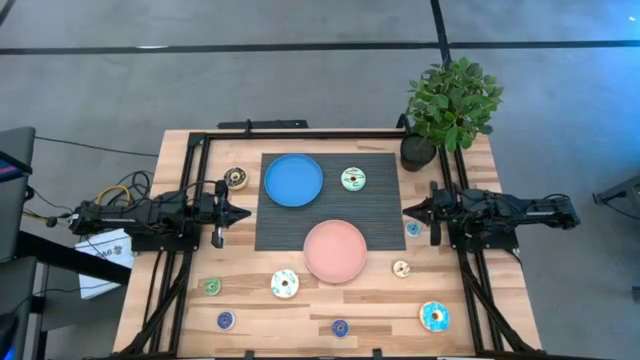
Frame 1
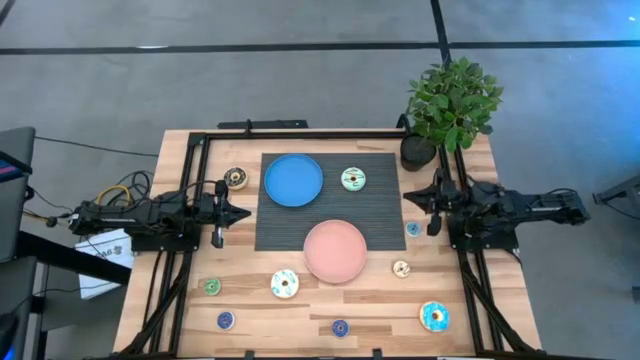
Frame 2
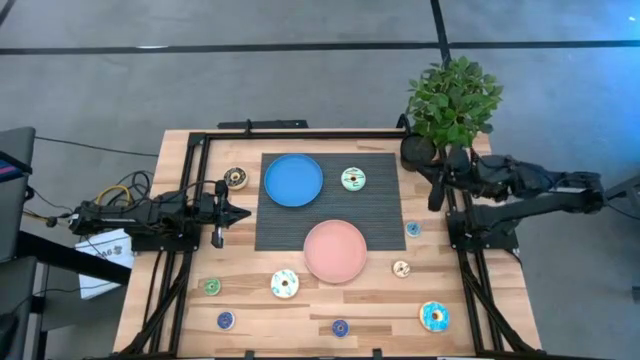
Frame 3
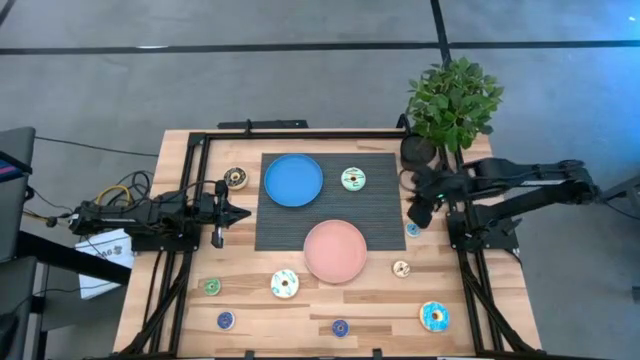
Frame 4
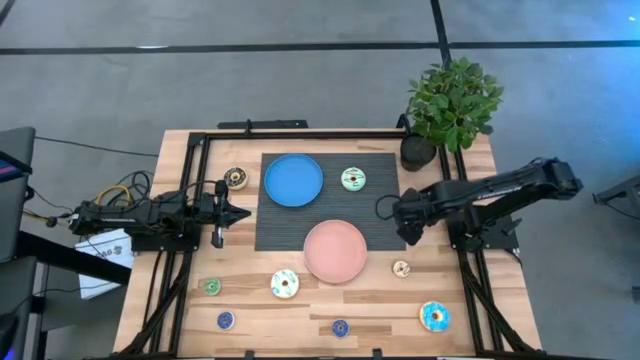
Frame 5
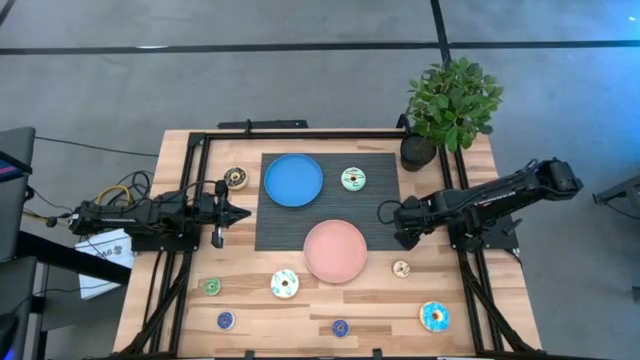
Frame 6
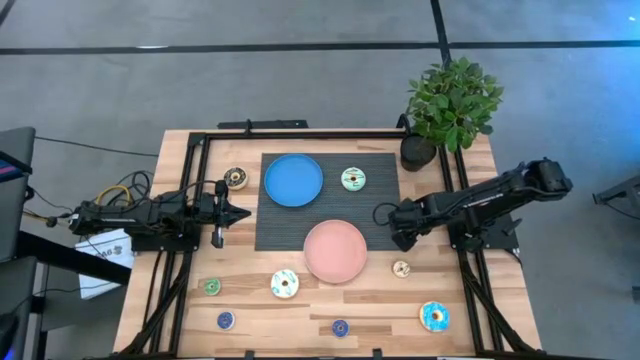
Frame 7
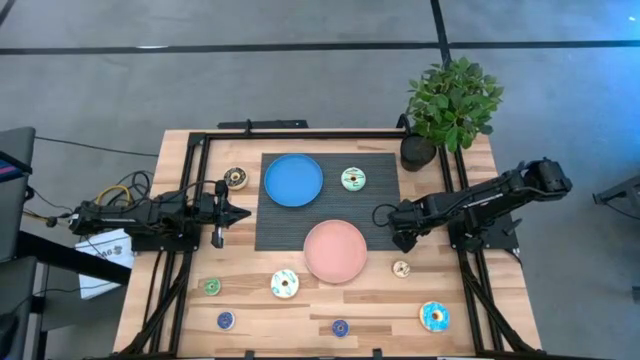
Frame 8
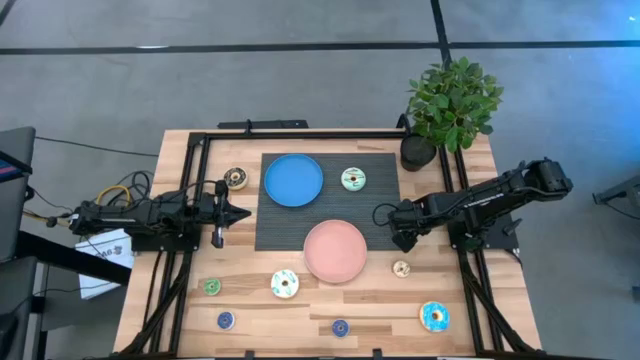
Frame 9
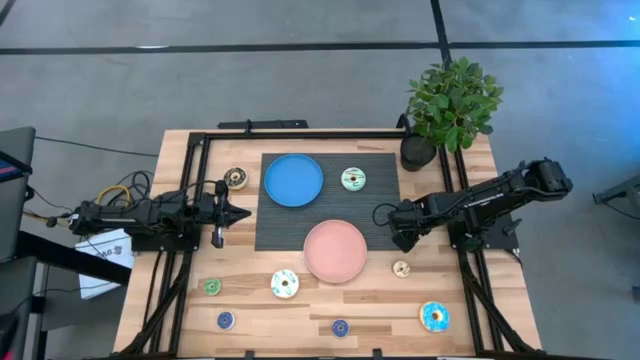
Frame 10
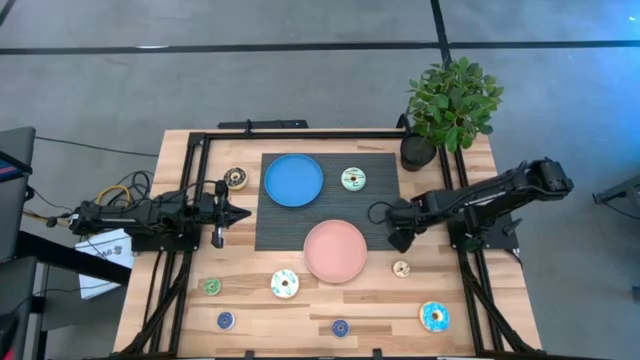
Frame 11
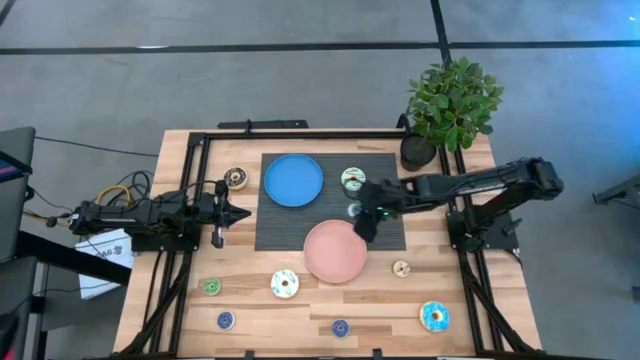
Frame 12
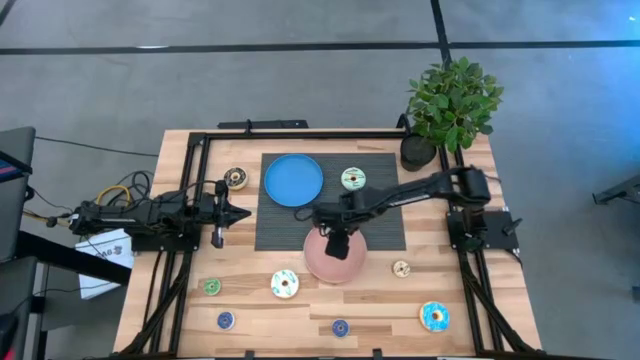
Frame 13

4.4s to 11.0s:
Task: Pick & Place donuts
Put the small blue donut on the pink plate

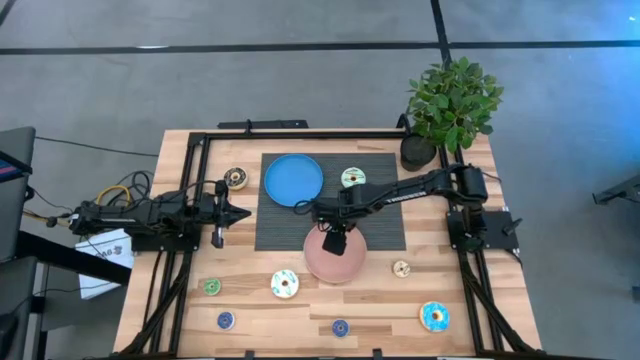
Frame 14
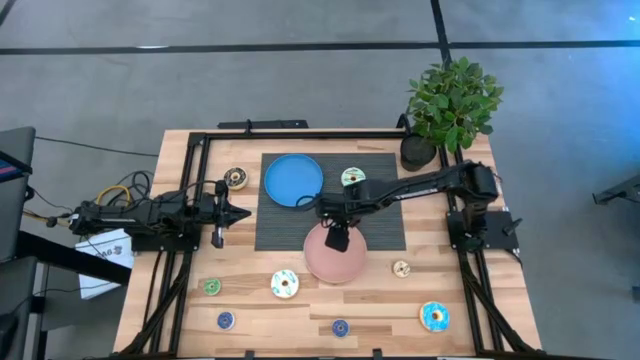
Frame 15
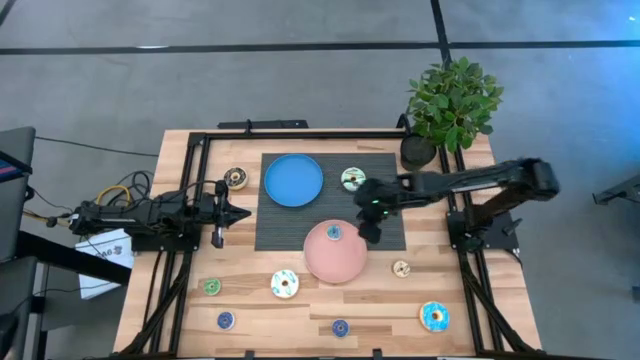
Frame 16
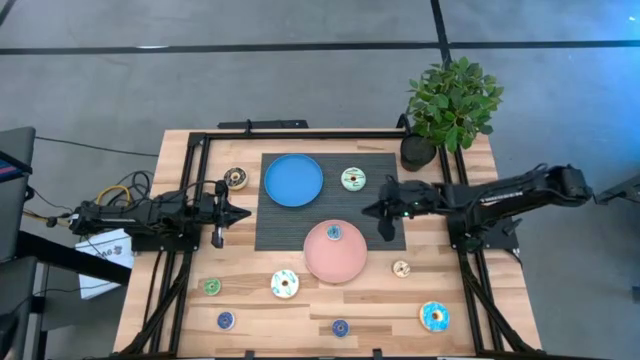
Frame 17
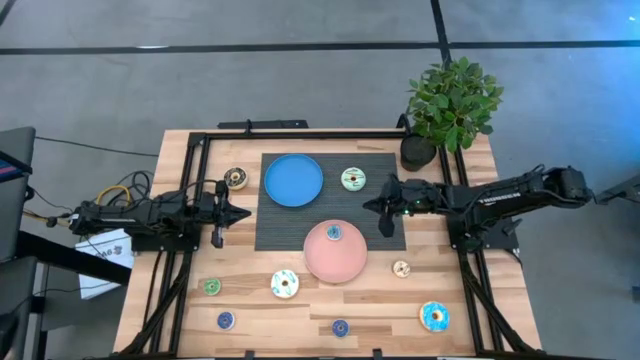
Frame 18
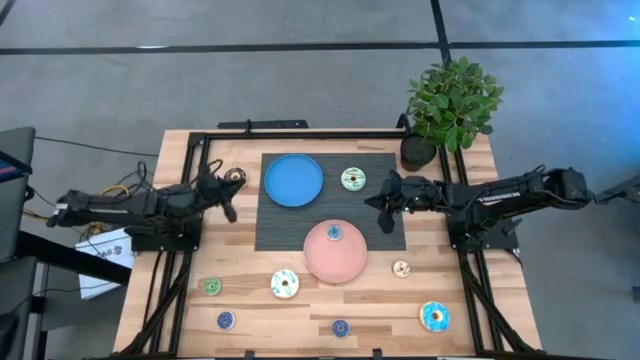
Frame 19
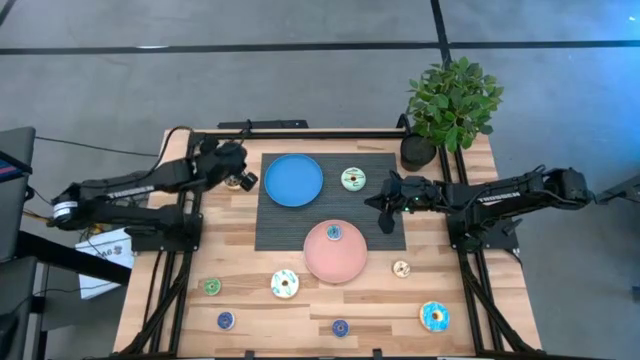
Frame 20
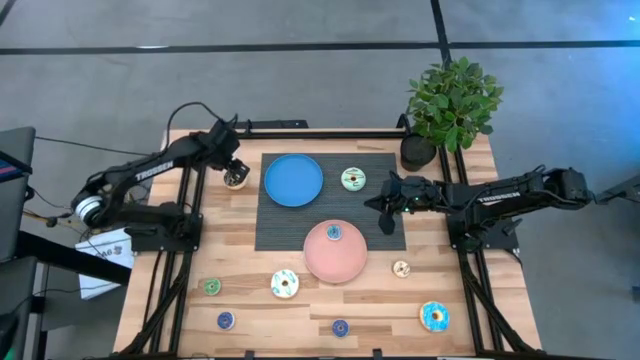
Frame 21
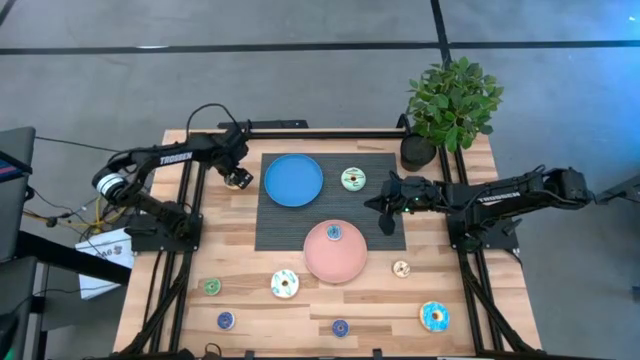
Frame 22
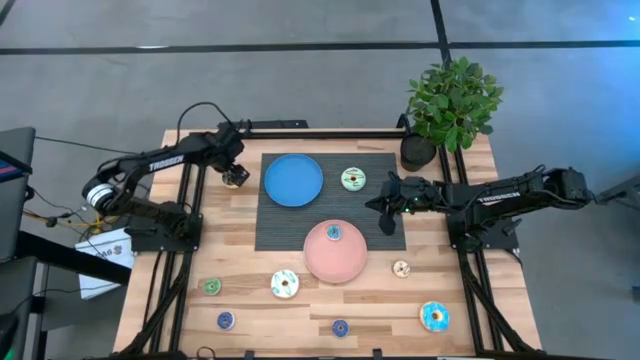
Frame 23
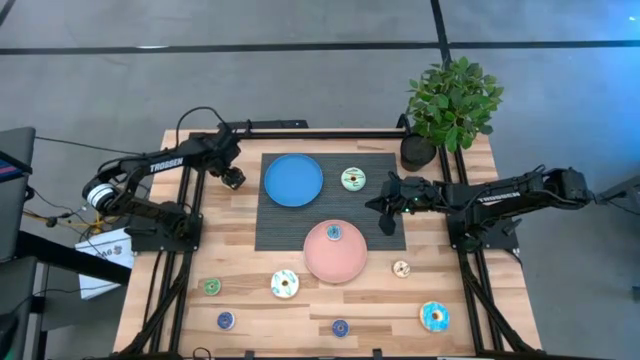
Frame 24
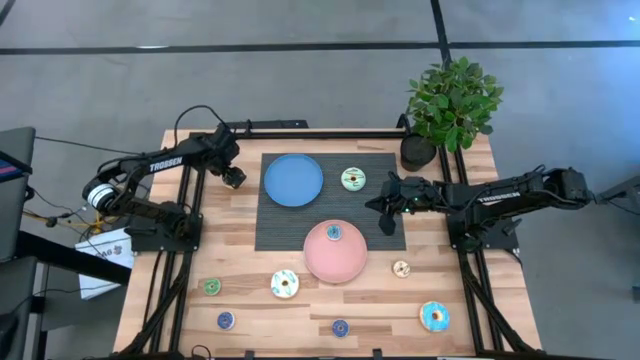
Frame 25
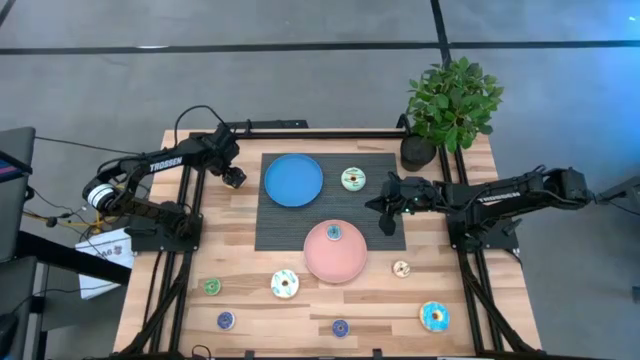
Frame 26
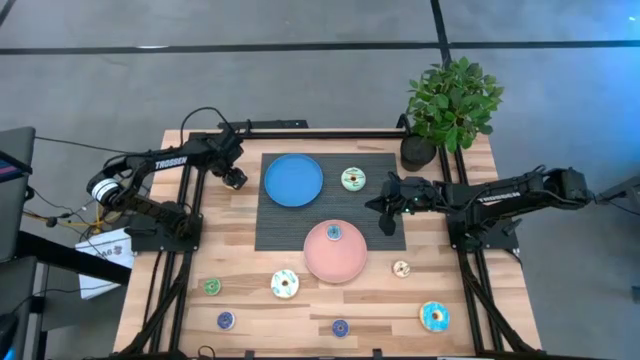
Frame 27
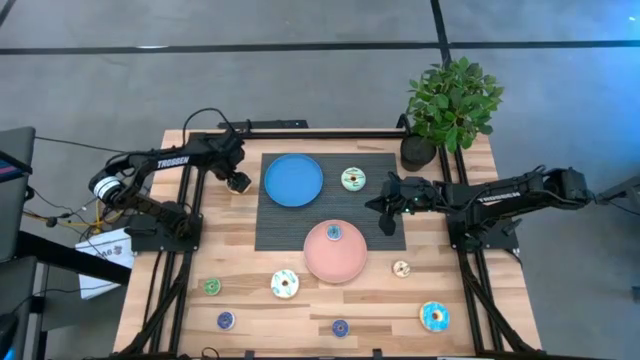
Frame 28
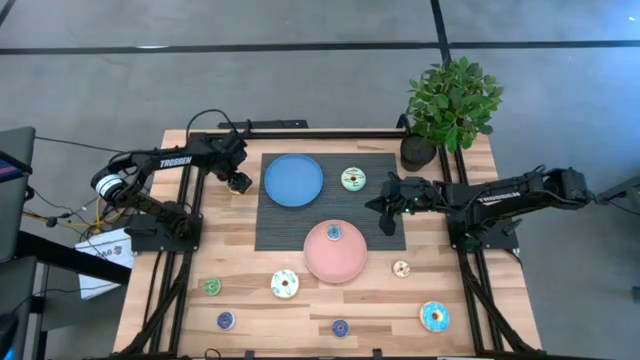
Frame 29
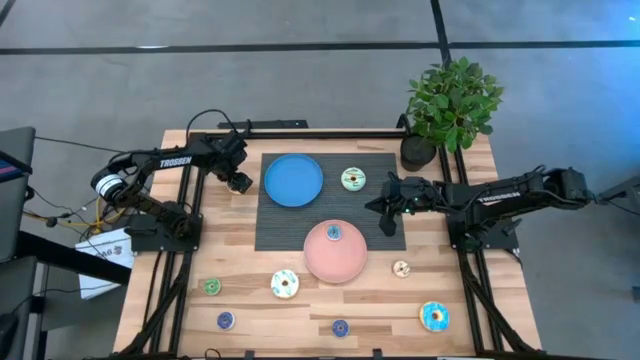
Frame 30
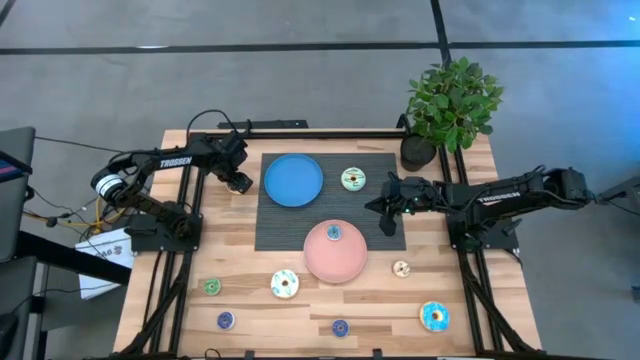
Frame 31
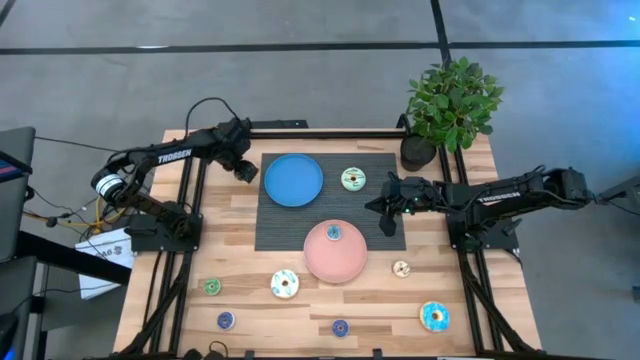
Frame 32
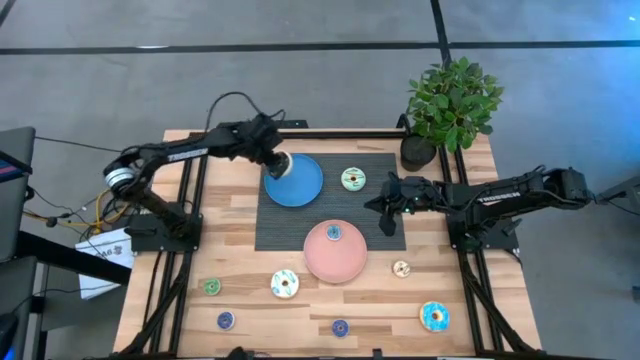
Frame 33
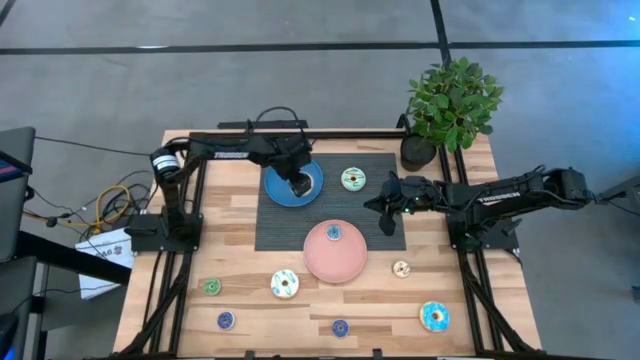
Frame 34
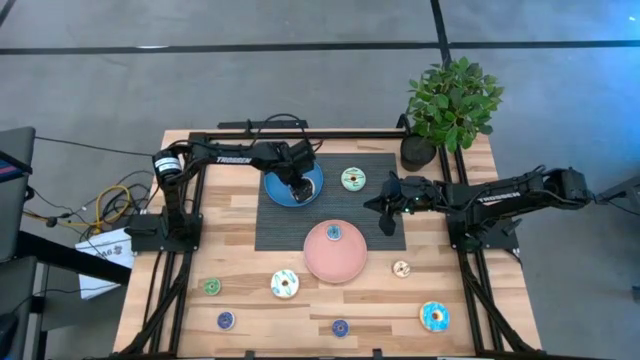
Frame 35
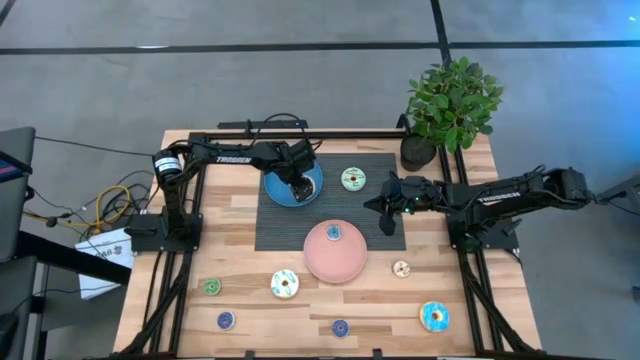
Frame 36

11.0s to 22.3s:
Put the large black donut on the blue plate

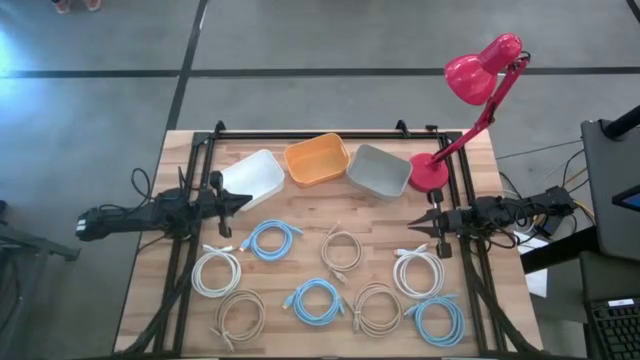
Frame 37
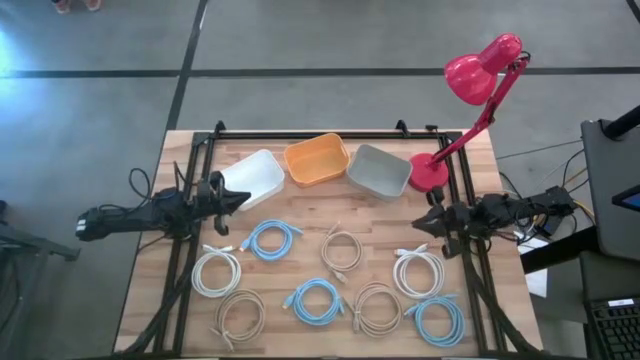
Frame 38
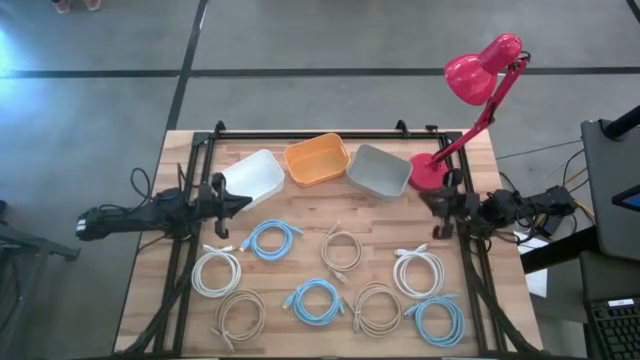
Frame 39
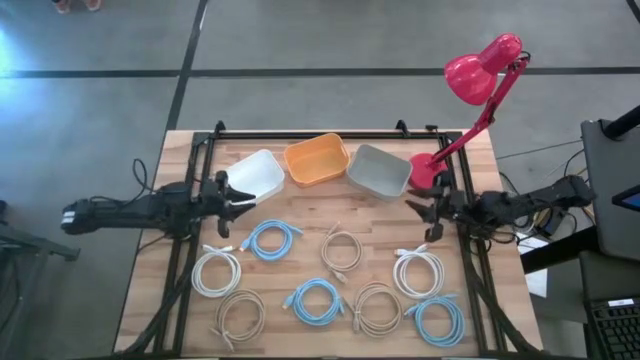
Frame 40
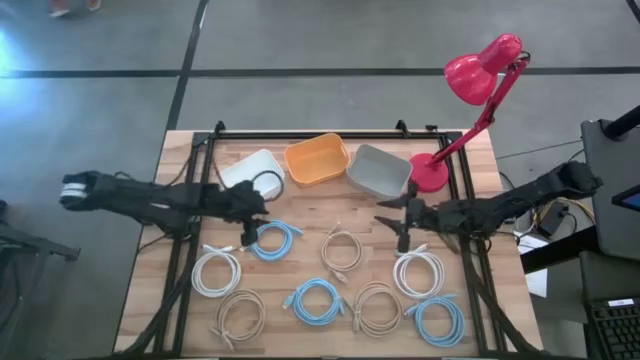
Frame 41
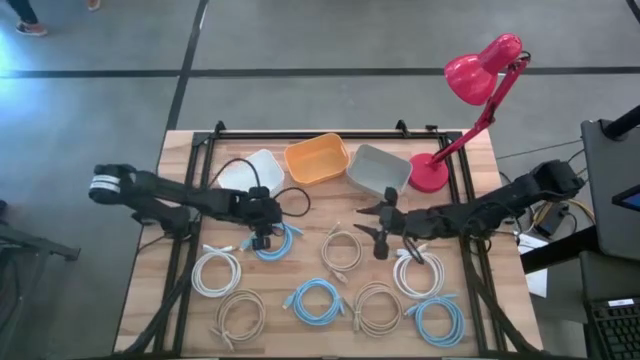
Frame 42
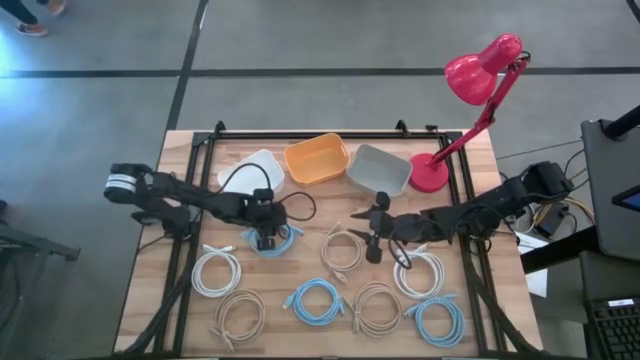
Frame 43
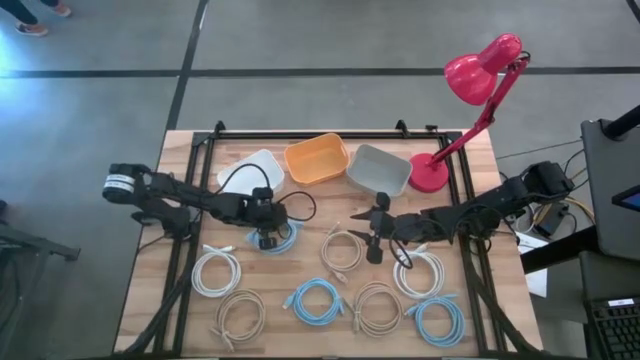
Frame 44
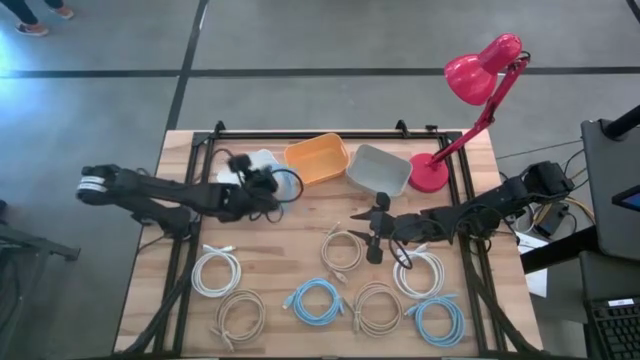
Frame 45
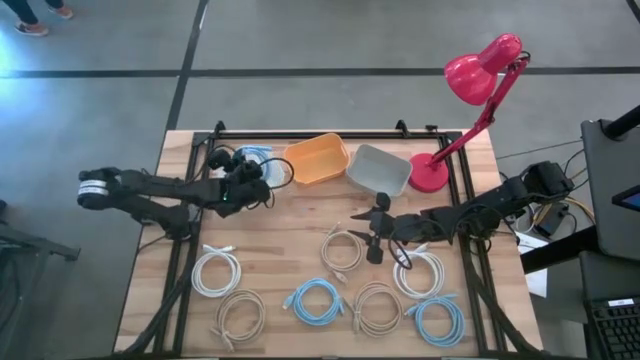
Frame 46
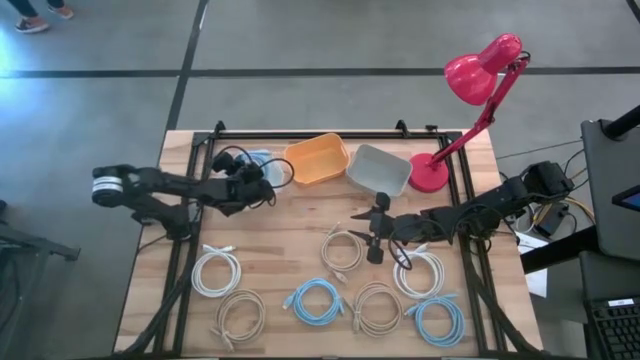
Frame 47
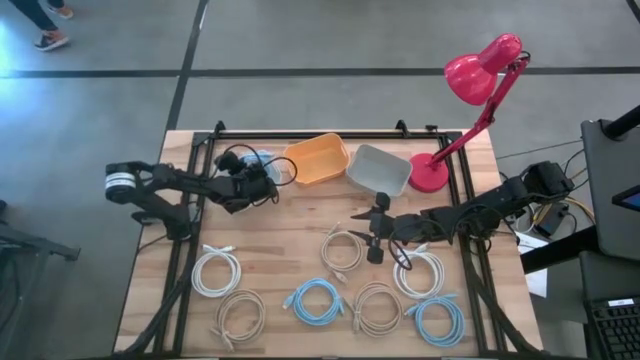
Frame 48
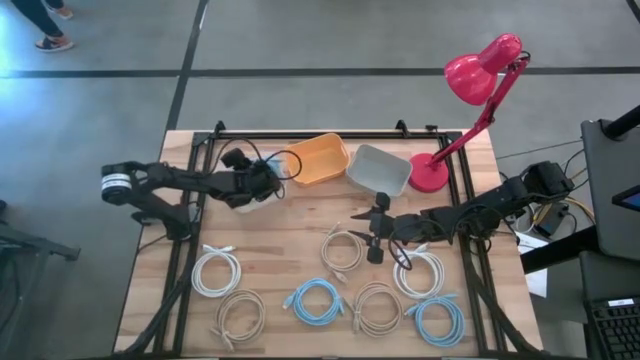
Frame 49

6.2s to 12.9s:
Task: Pick & Place USB Port
Put the top blue charger cable into the white bin
